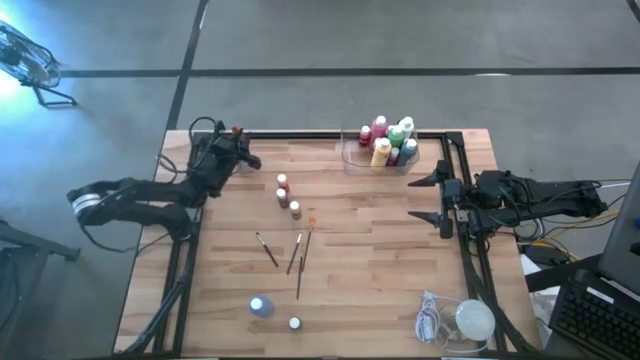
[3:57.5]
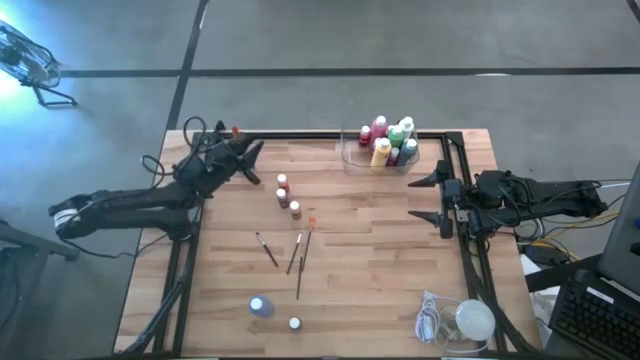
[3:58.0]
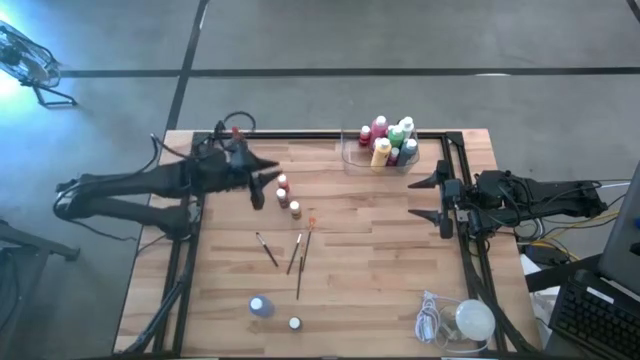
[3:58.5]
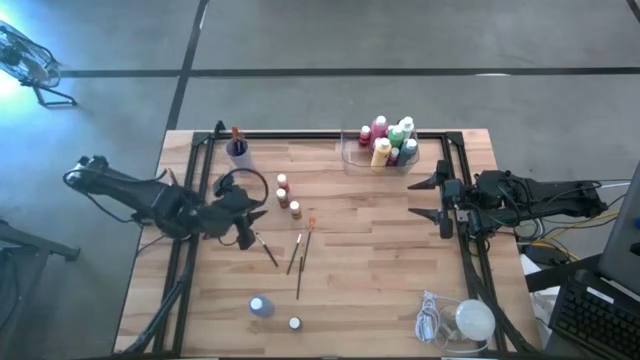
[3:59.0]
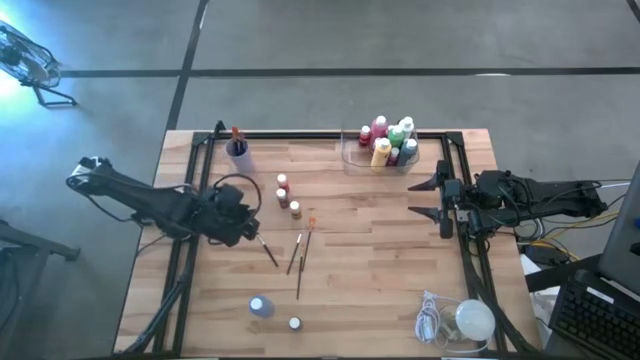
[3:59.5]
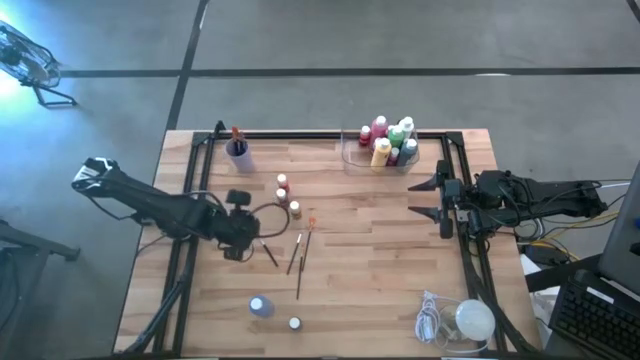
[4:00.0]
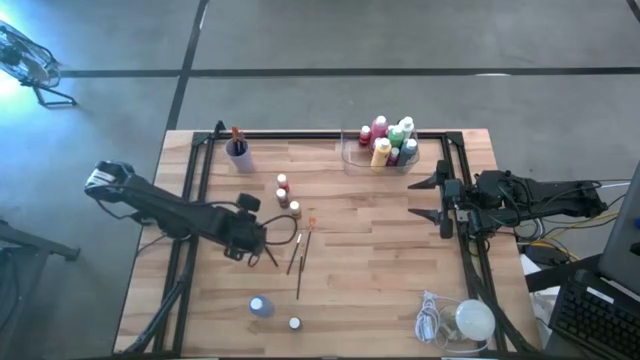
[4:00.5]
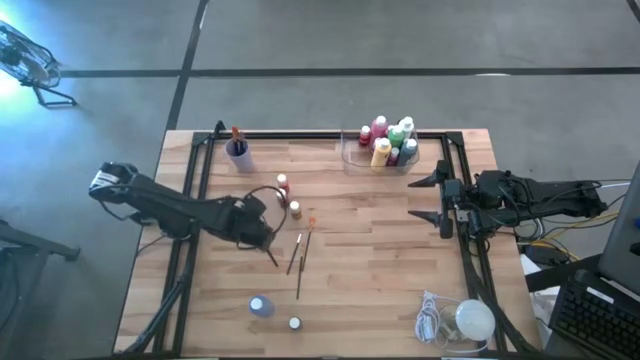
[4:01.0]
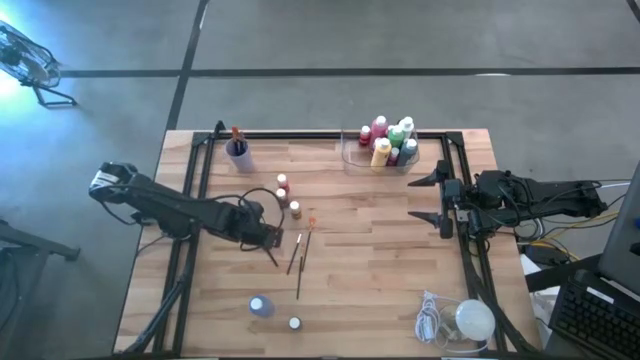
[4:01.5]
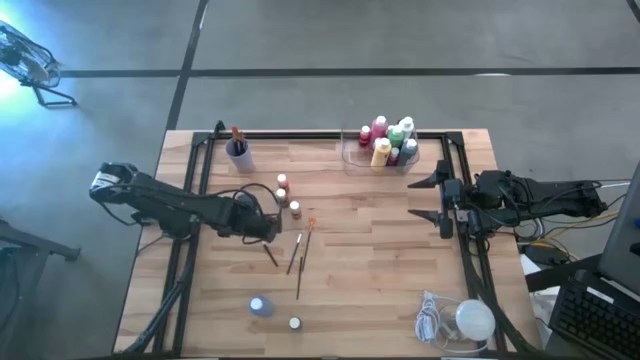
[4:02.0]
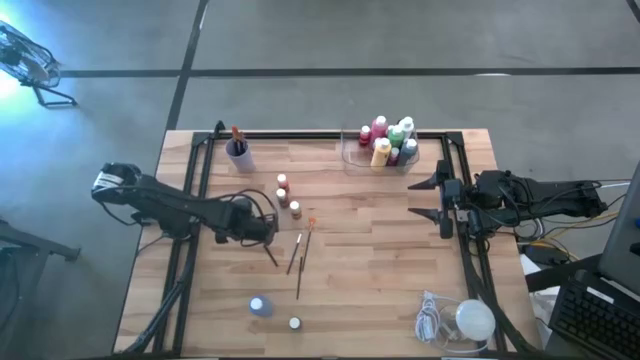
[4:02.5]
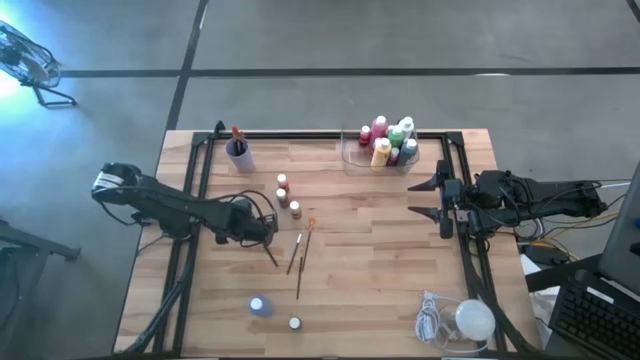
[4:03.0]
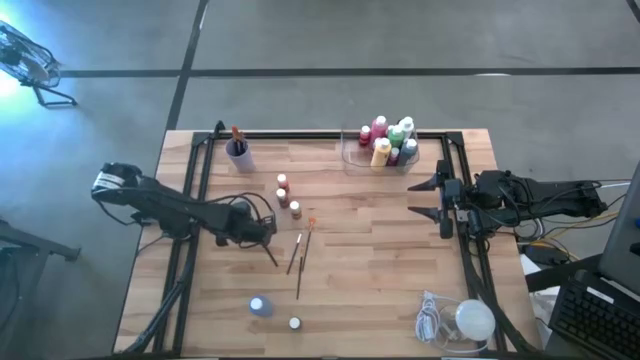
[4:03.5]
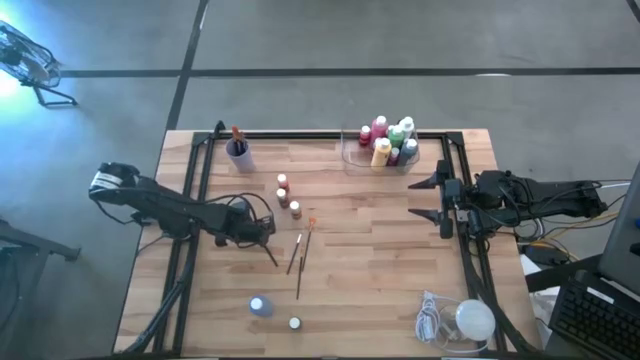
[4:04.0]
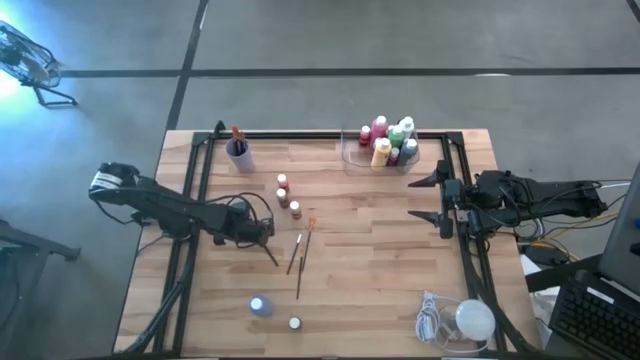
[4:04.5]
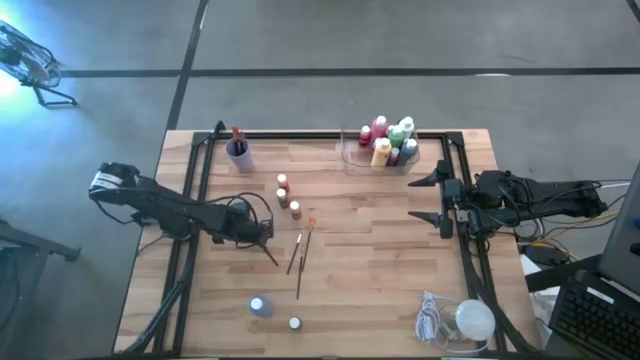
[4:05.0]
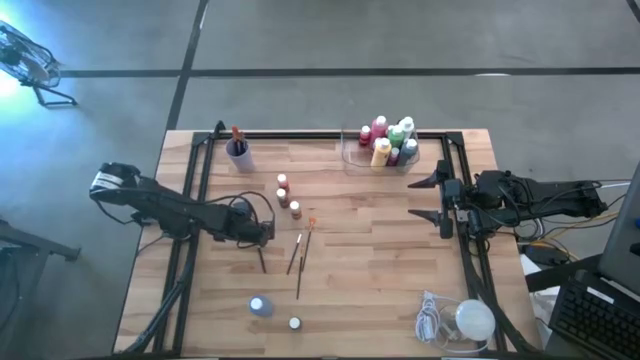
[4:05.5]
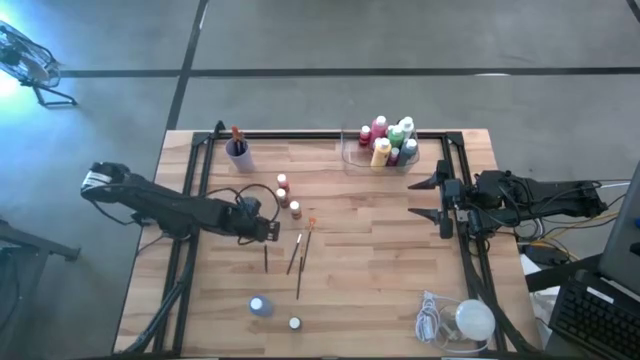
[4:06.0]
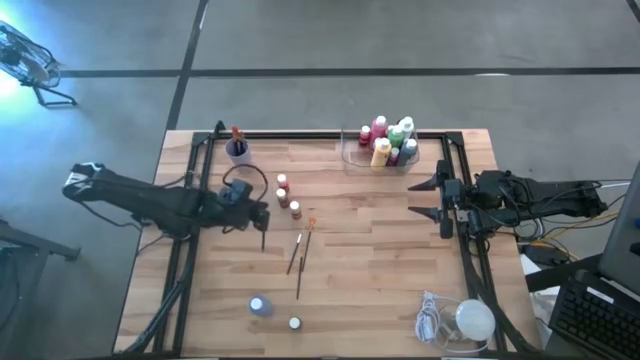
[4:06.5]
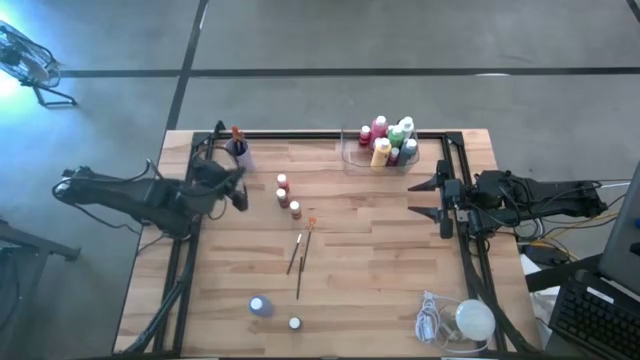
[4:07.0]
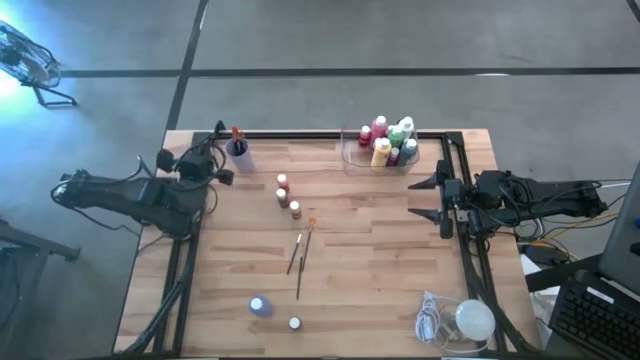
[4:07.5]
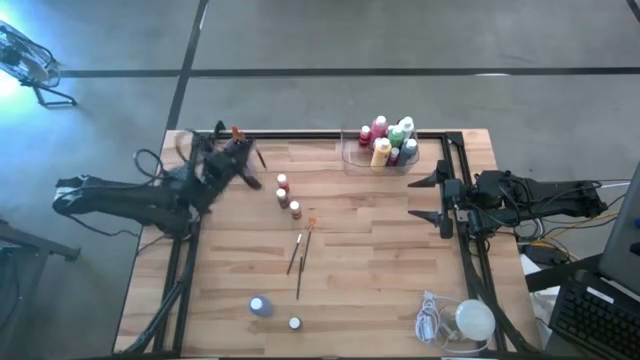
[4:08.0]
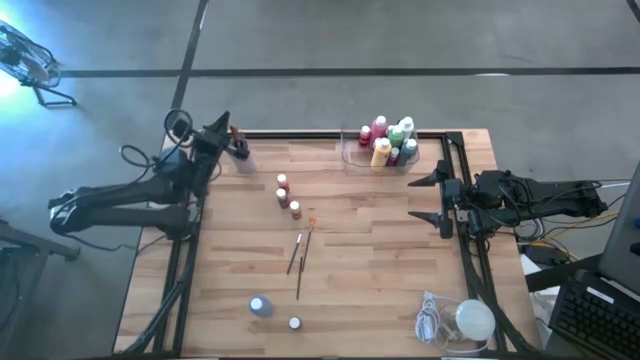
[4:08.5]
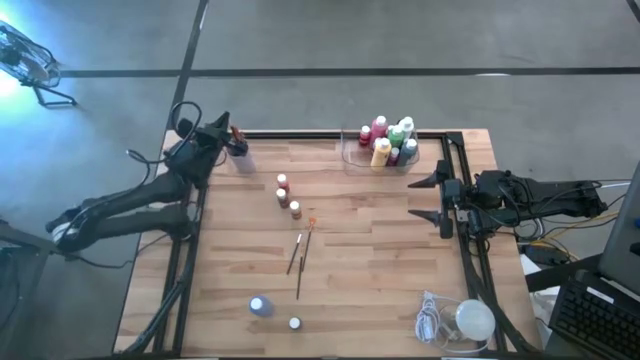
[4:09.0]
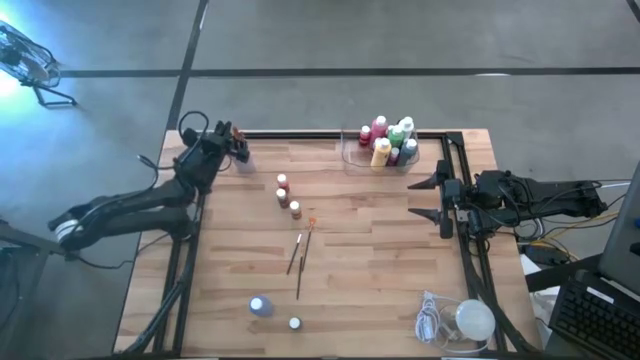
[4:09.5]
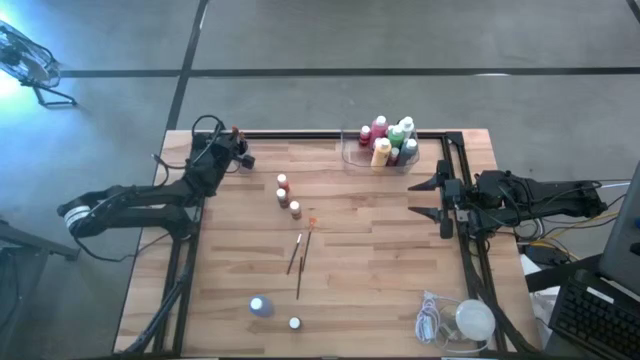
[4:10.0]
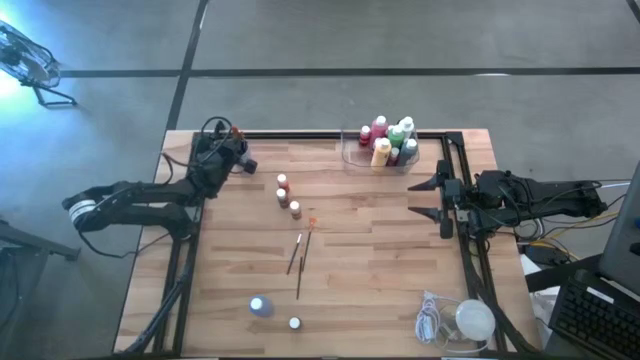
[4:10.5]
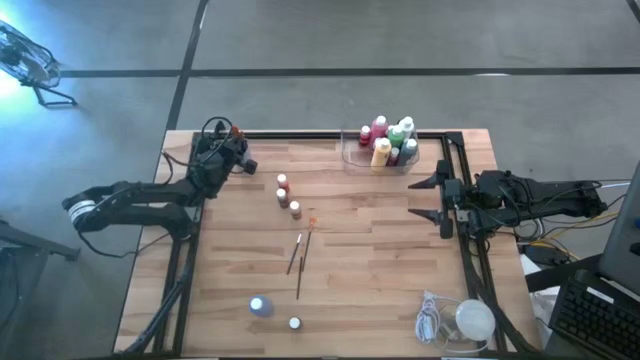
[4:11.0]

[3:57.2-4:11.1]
Task: Pick & Place Paint Supplies
Put the silver paint brush into the violet cup
